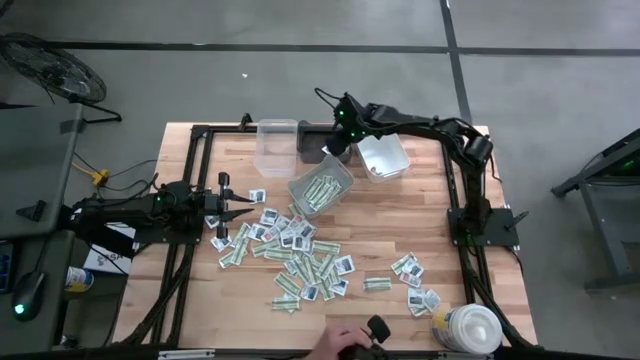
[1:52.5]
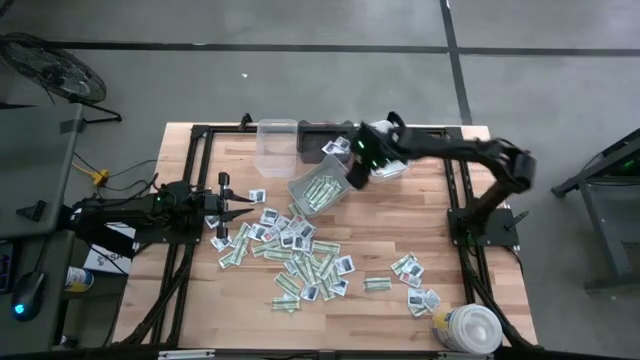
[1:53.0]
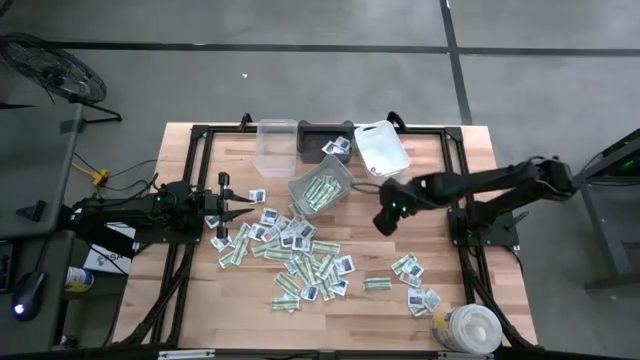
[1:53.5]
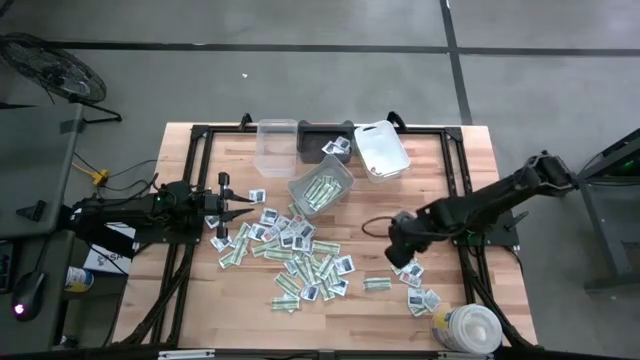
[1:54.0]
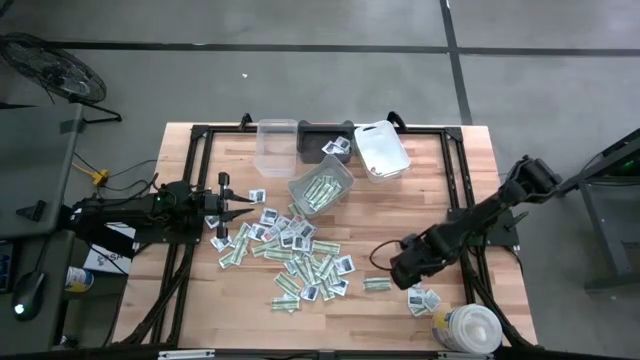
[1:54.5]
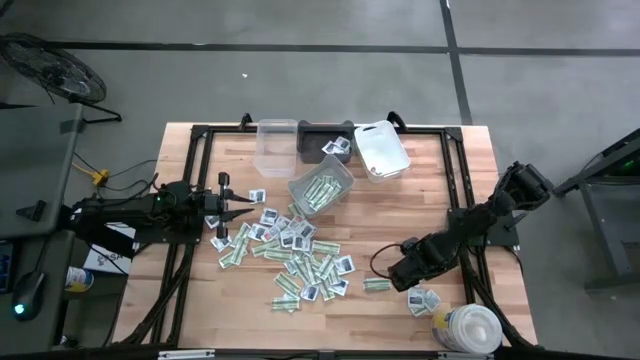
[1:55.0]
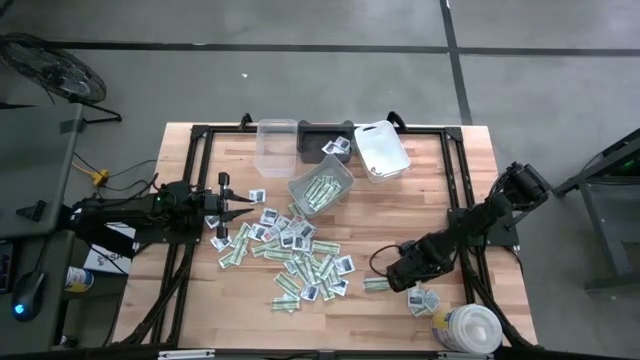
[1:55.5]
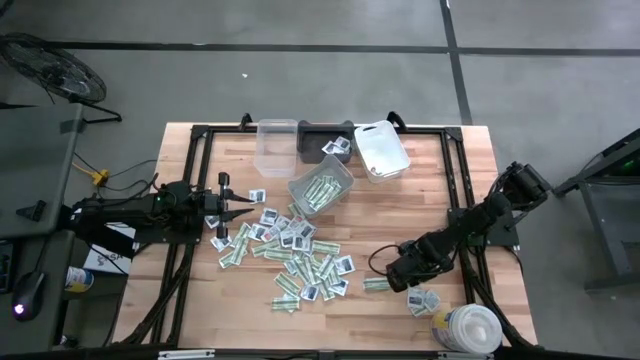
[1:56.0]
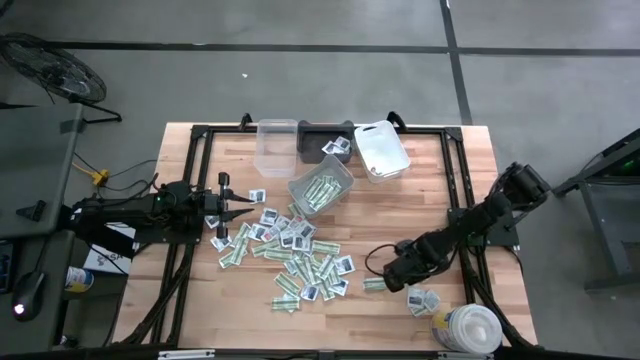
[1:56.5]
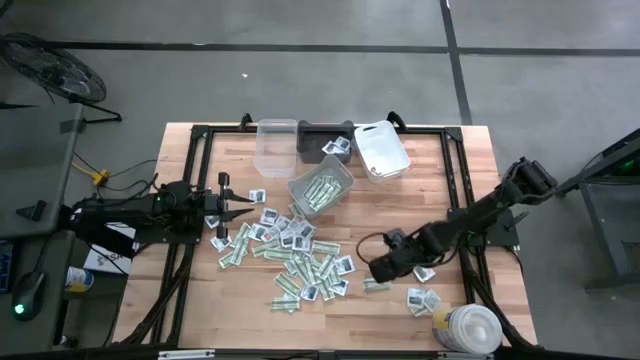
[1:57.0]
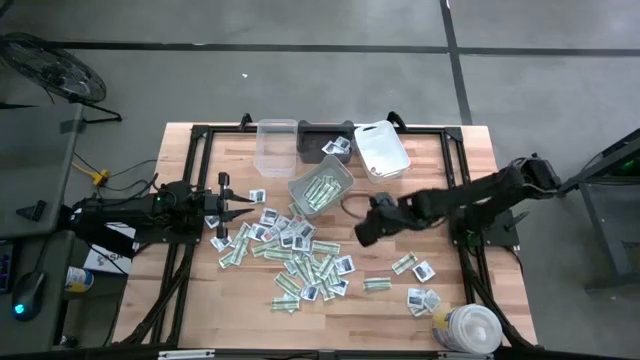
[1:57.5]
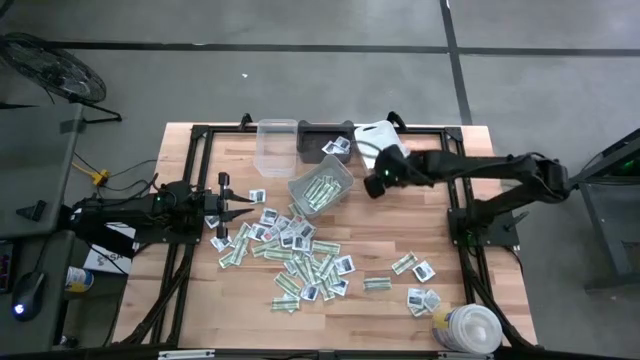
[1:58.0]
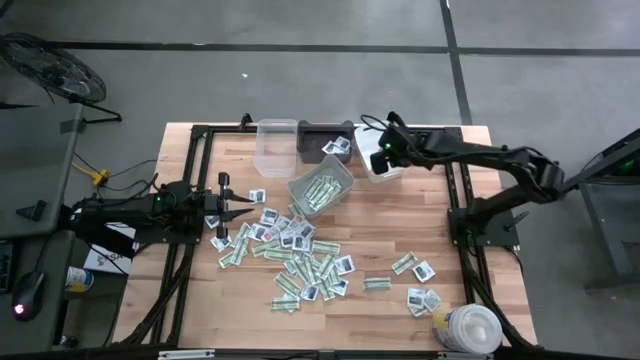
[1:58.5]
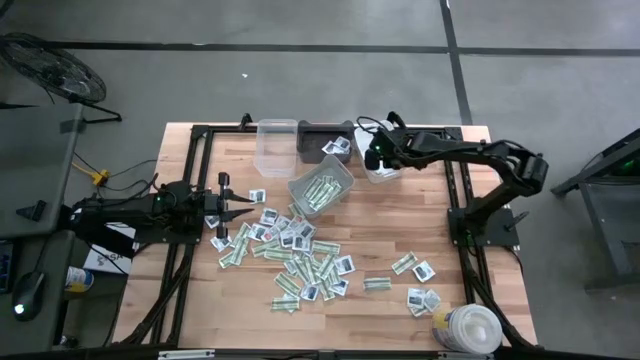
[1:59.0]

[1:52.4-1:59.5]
Task: Pick & Place First Aid Supplies
Put the ointment pack into the white bin

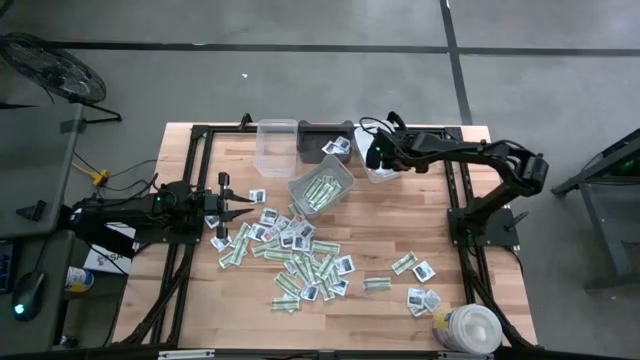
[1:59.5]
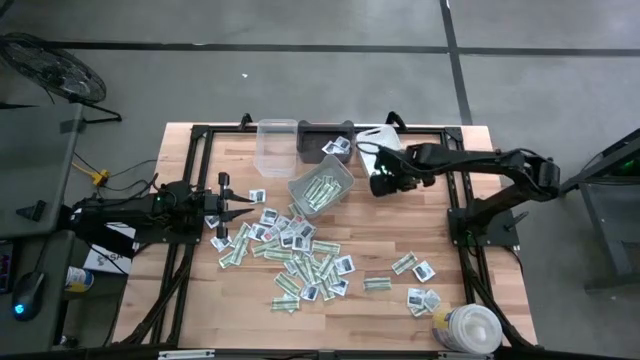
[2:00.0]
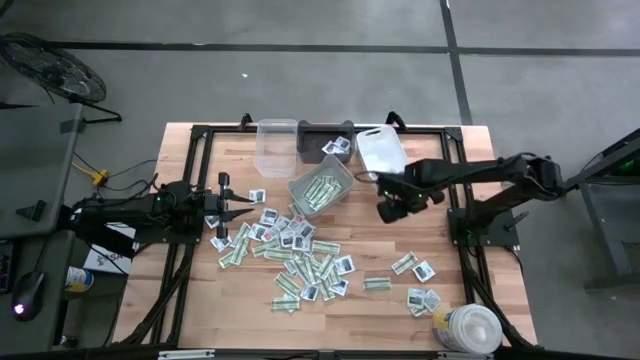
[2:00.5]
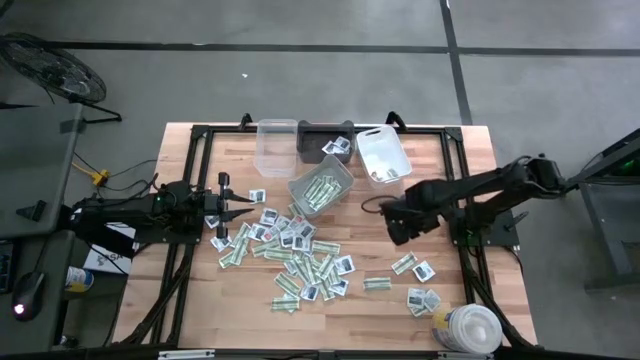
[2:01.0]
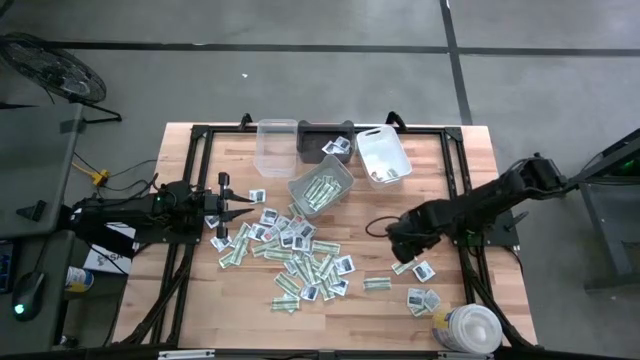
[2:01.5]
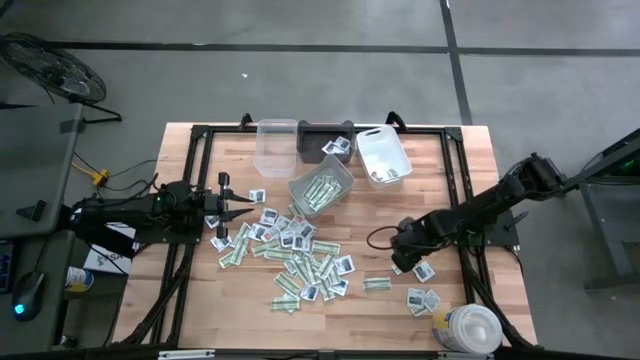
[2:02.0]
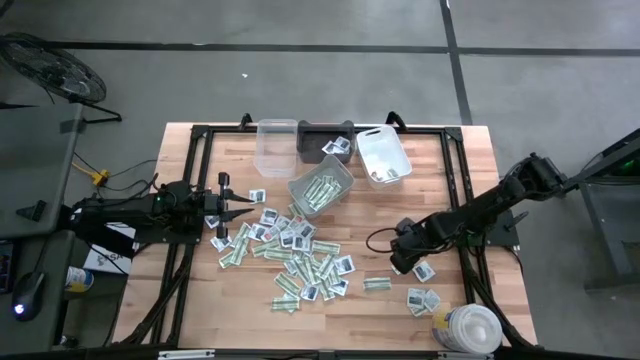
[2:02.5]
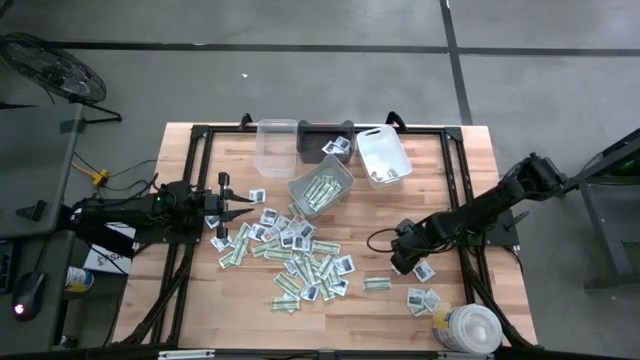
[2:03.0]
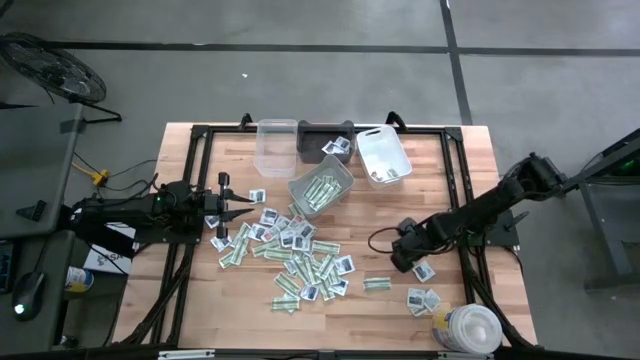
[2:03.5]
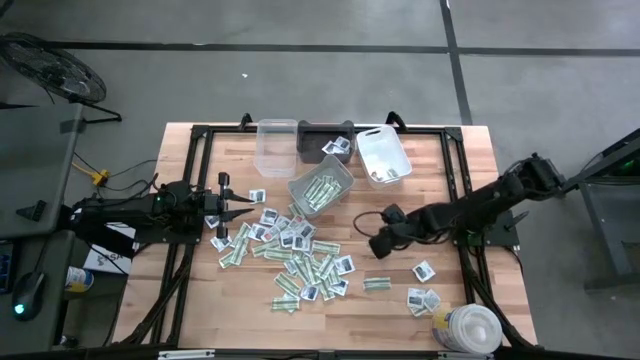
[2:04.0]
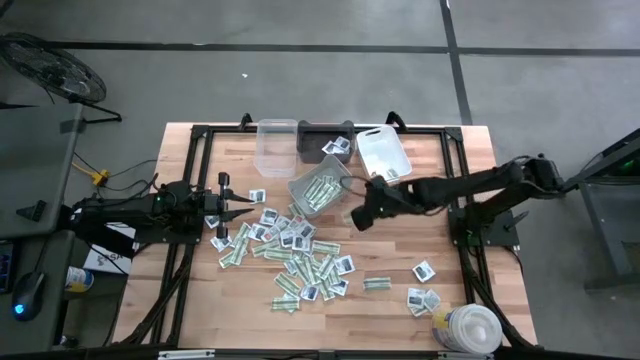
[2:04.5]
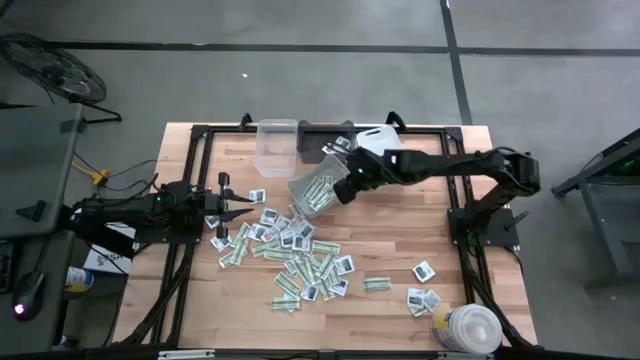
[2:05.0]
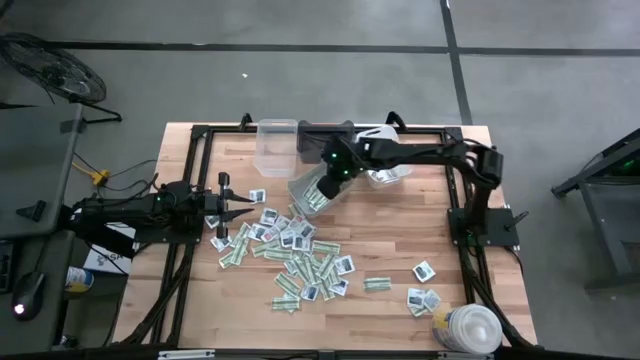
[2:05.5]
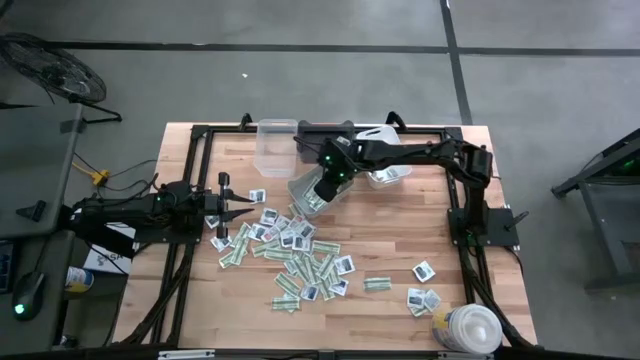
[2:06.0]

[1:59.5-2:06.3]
Put the bandage pack into the gray bin

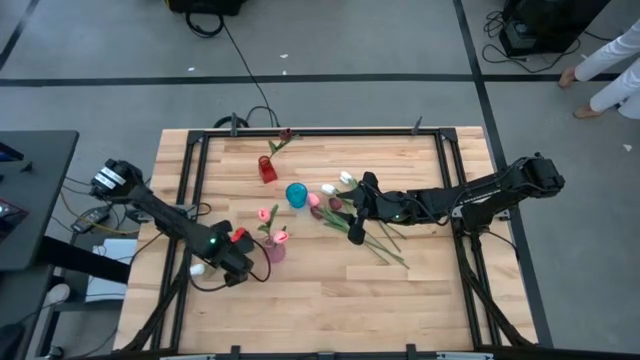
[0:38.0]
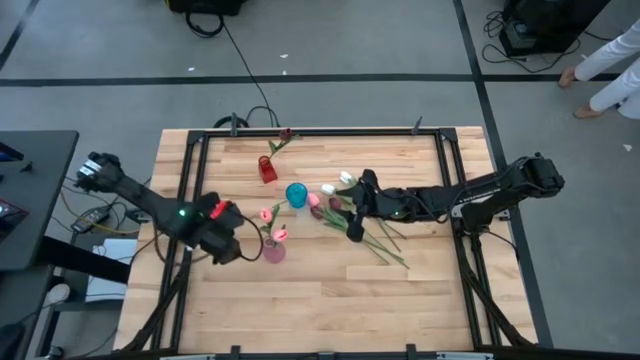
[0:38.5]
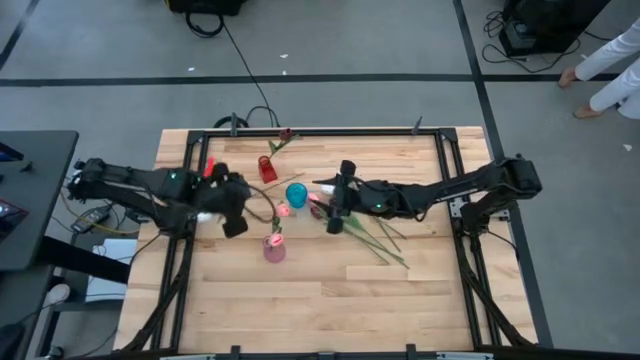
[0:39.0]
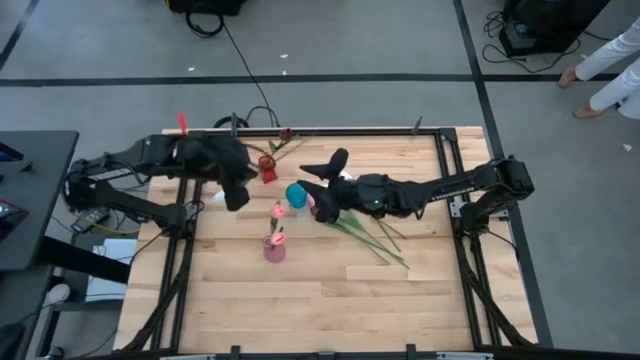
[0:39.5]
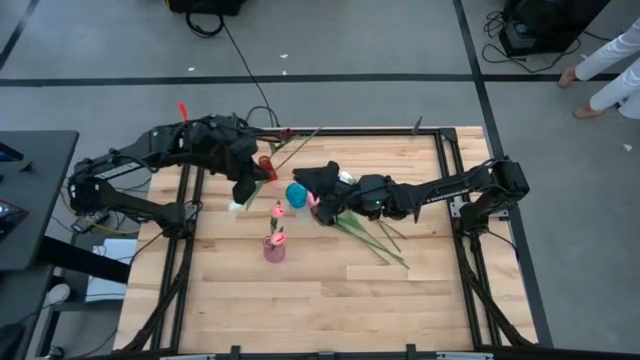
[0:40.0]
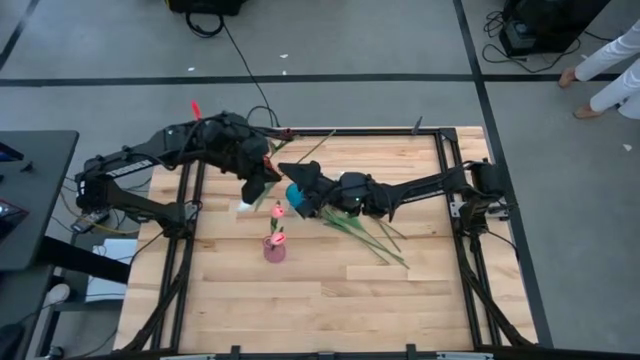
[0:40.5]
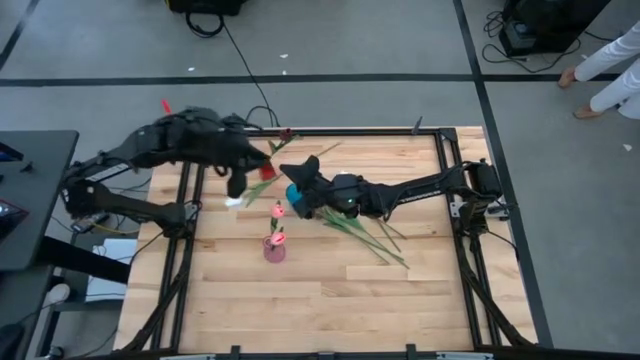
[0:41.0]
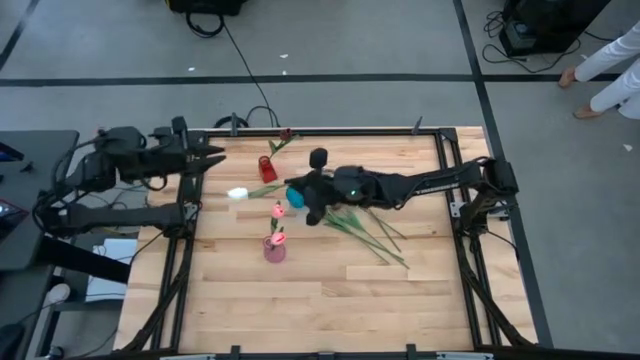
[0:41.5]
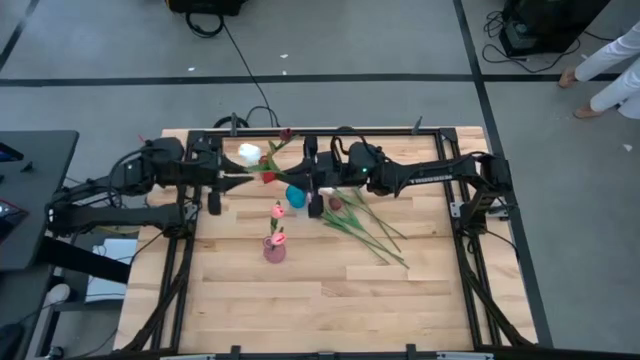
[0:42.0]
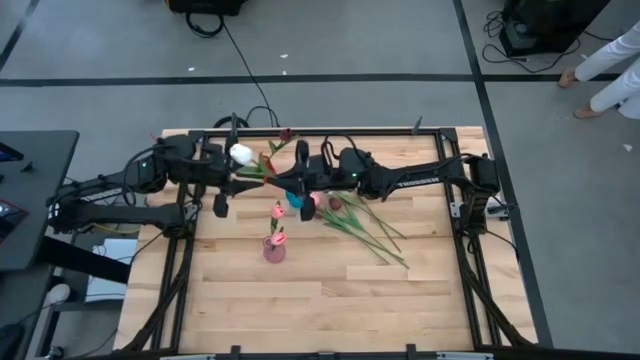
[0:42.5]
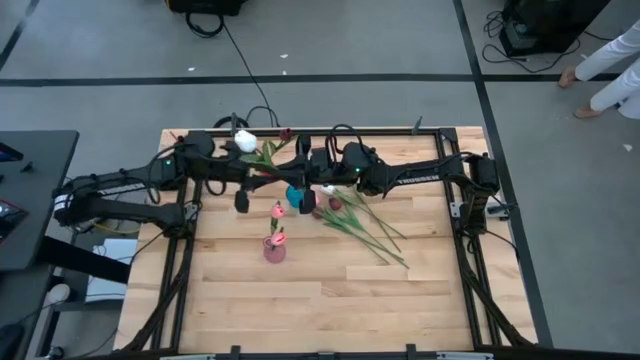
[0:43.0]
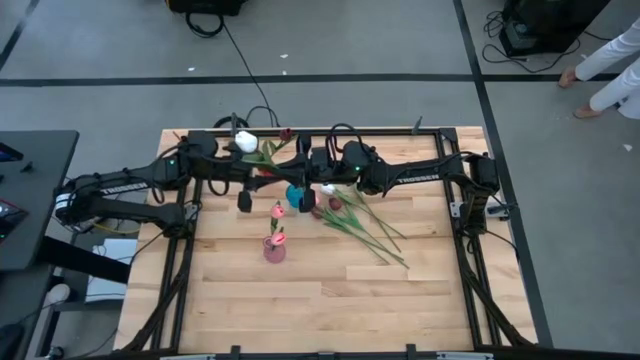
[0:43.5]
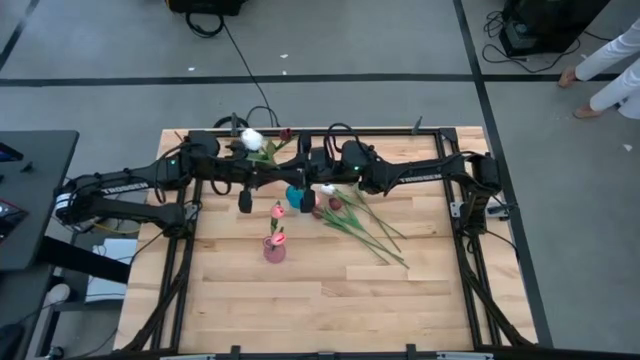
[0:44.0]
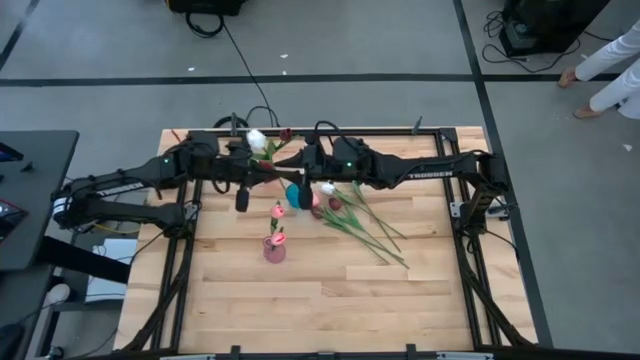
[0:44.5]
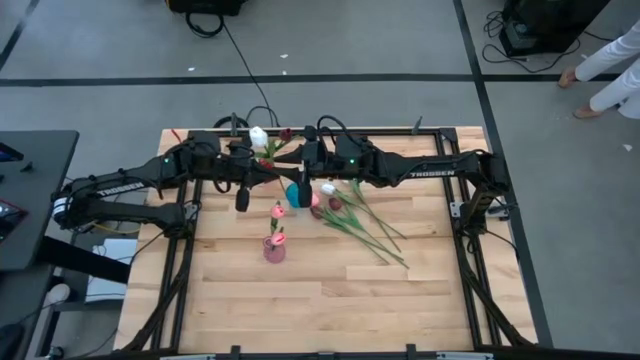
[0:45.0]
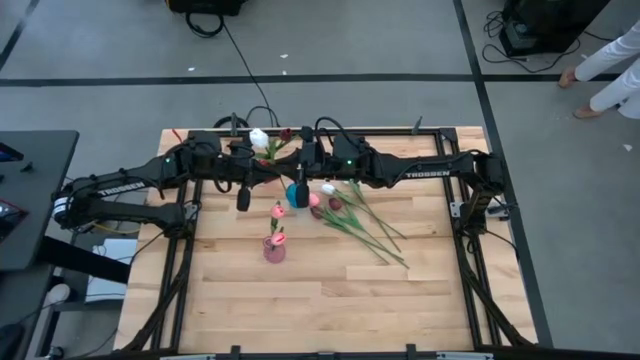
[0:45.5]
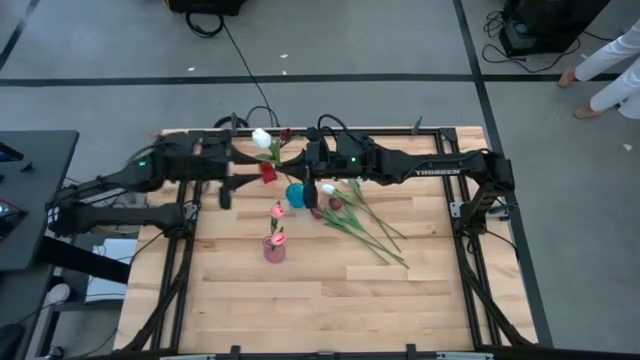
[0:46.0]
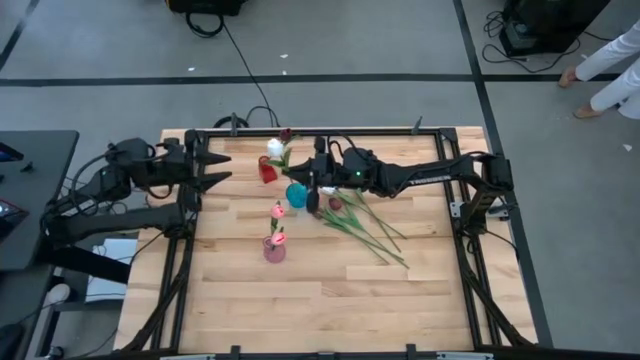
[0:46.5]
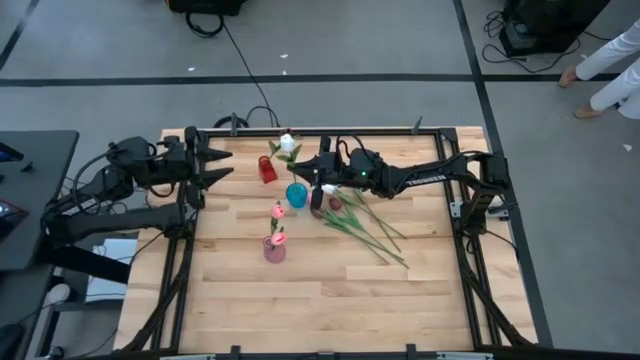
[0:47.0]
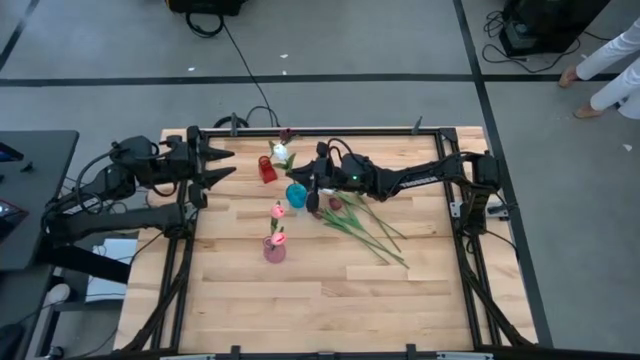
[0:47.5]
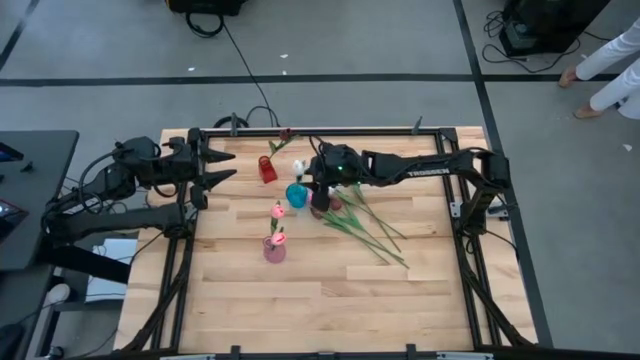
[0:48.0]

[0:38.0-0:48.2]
Task: Sort flowers into vase by color
Put the middle left white flower into the blue vase
